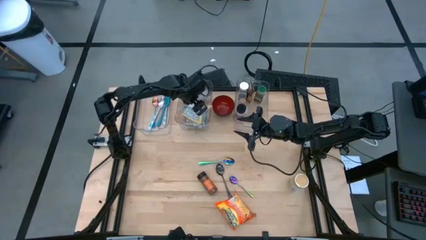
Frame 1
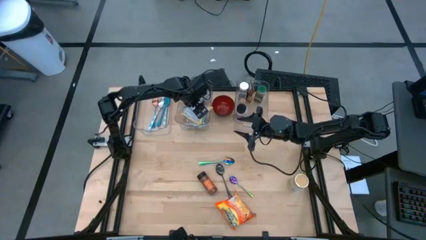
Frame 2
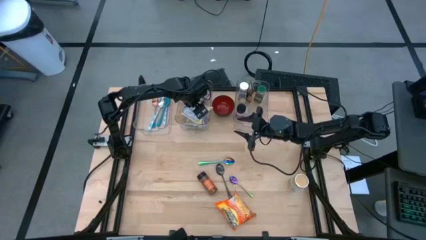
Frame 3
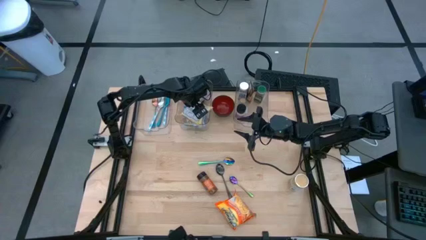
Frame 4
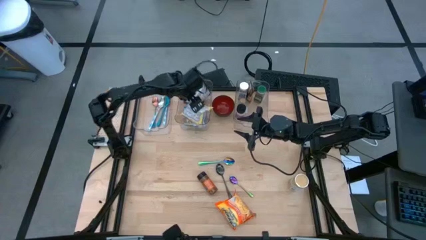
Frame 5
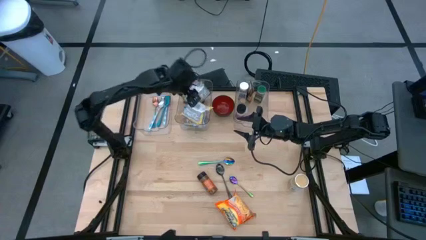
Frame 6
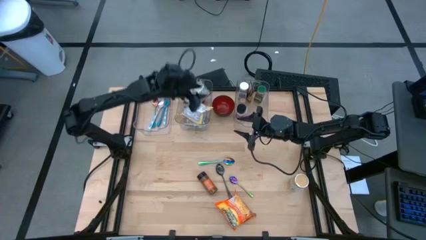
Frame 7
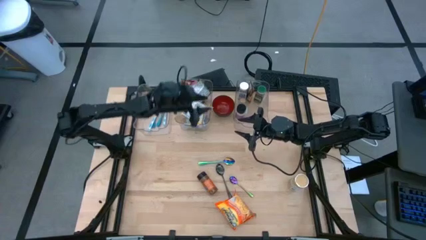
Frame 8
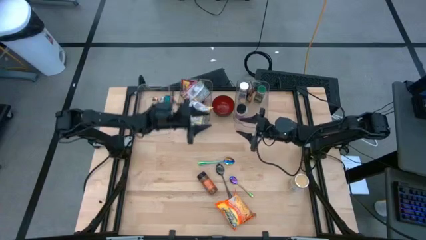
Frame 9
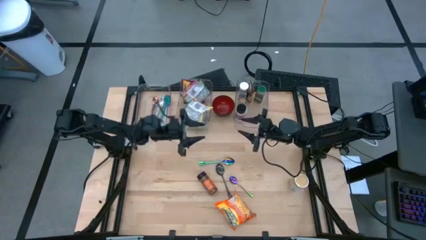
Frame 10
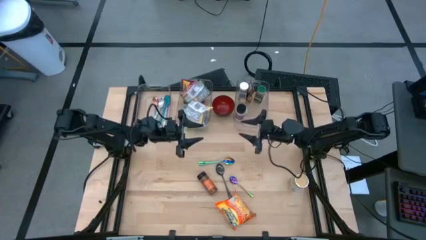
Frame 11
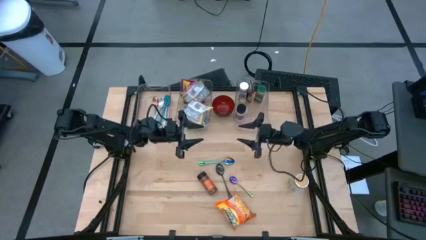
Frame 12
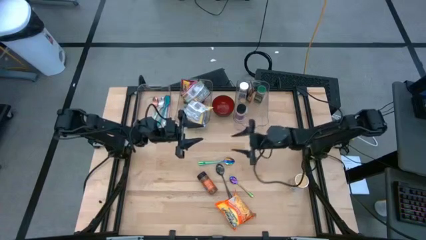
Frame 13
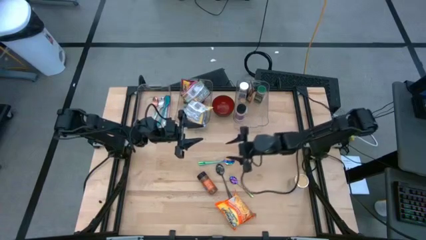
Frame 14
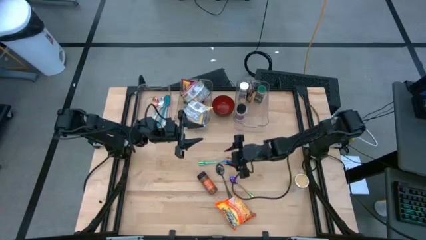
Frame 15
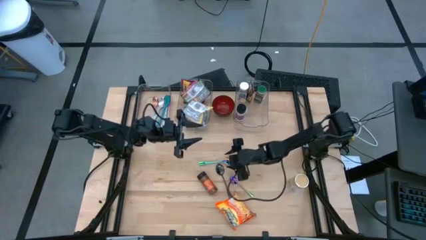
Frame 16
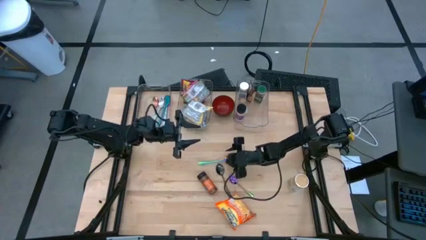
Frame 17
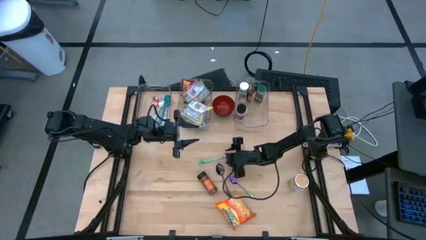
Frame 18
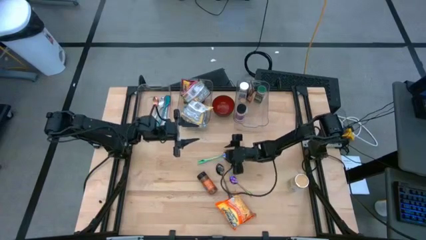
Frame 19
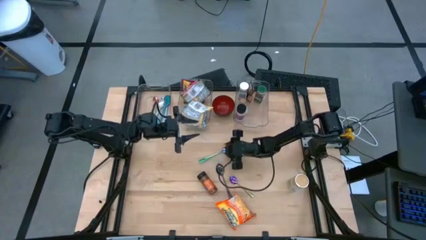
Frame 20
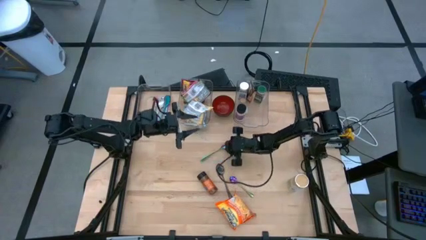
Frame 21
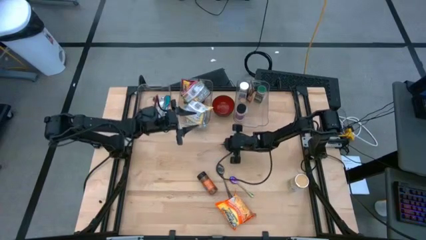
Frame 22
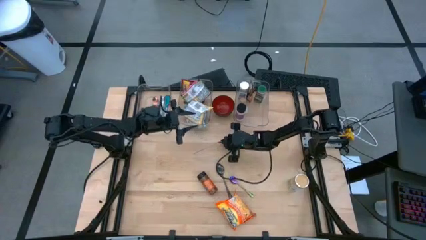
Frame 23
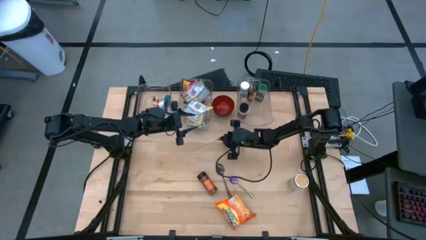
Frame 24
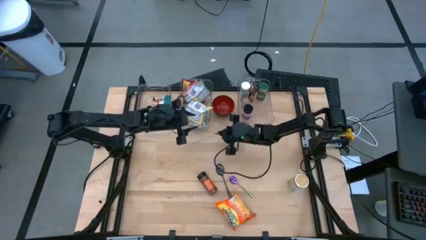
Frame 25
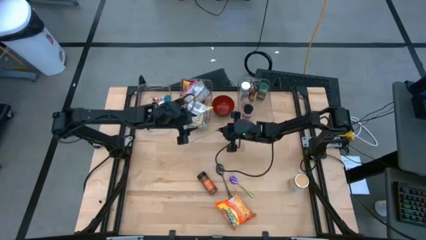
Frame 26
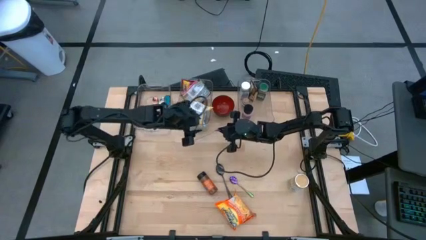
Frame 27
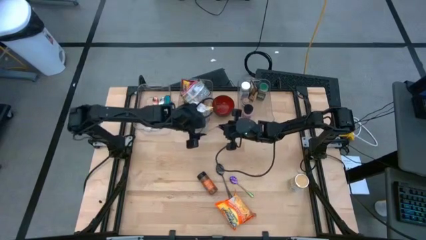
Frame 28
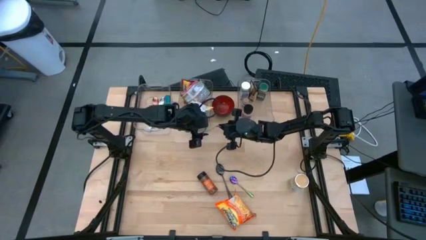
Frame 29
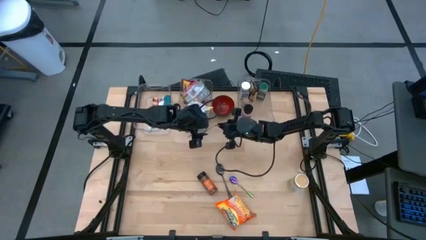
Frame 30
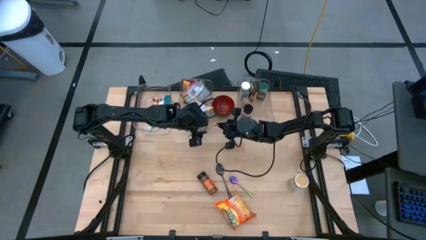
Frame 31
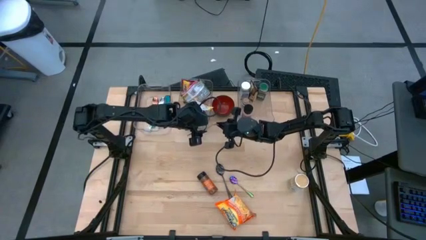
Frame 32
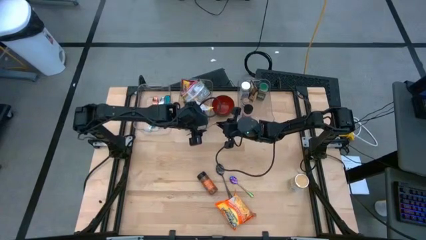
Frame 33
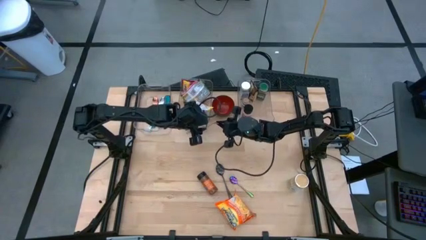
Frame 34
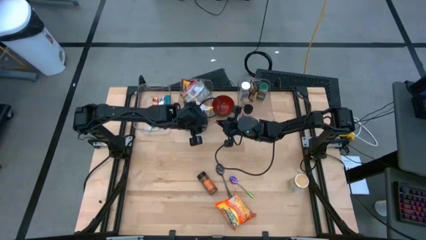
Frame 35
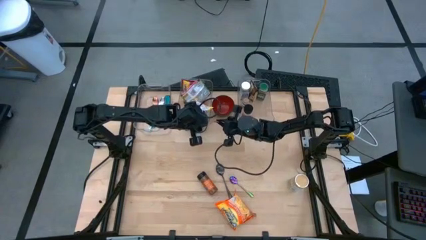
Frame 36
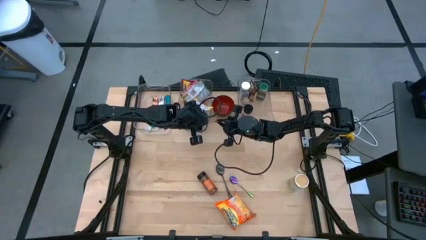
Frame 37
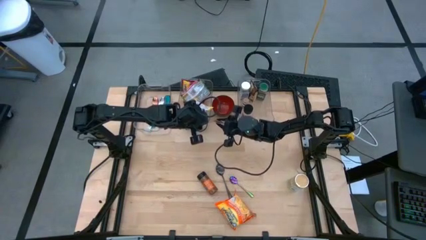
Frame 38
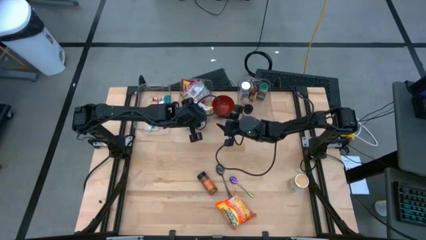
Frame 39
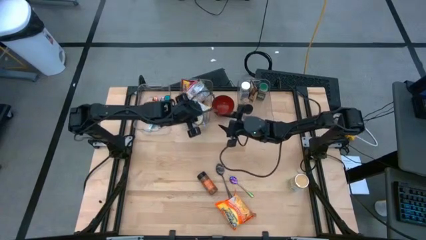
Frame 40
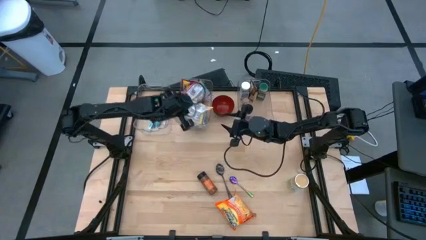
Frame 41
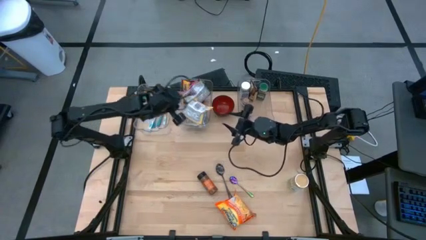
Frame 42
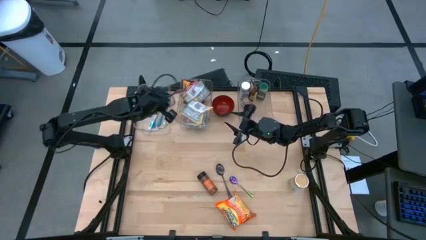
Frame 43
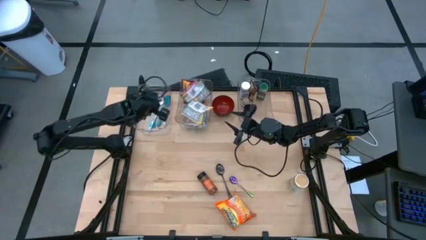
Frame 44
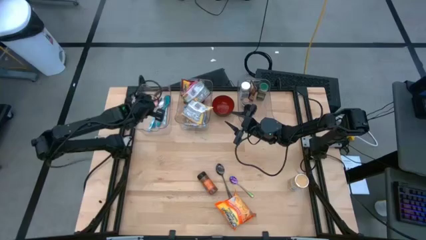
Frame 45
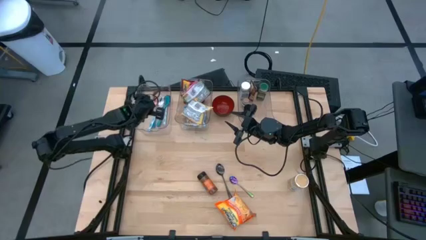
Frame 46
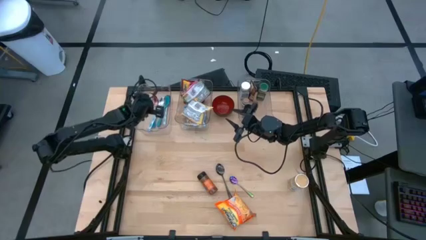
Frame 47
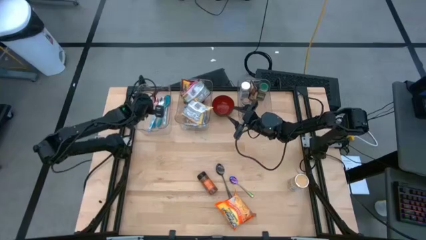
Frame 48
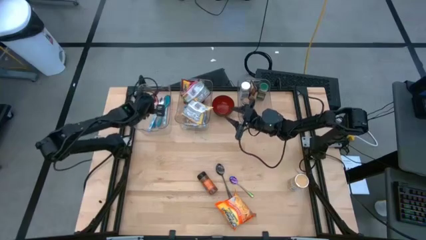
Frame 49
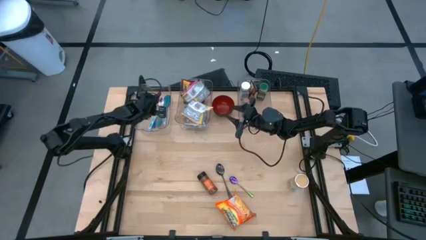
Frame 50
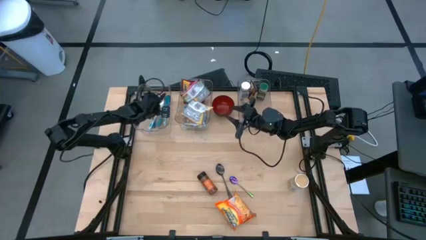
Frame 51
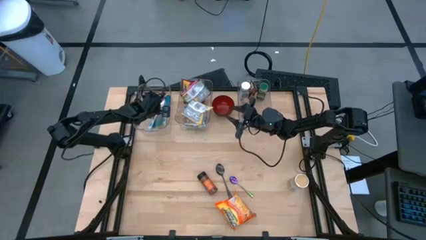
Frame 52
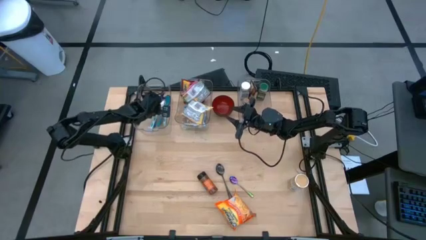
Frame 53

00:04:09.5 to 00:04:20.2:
Task: Pick & Place Food Item
Put the green spoon into the left transparent bin

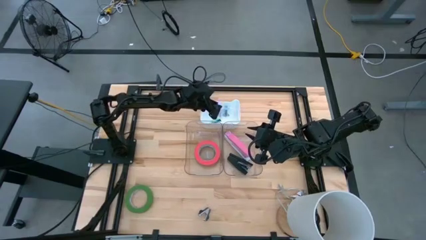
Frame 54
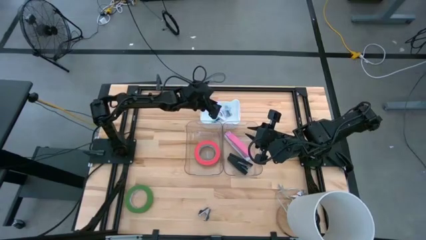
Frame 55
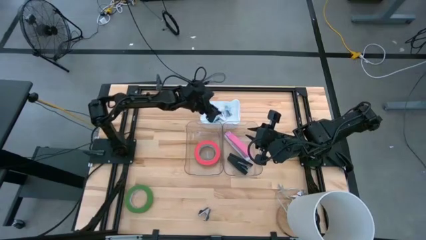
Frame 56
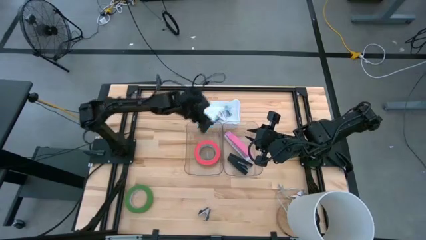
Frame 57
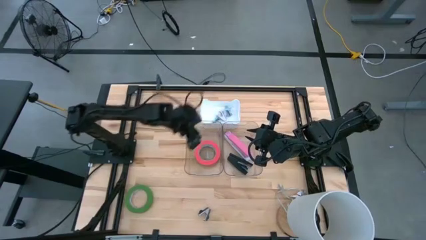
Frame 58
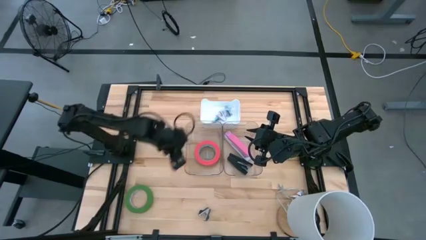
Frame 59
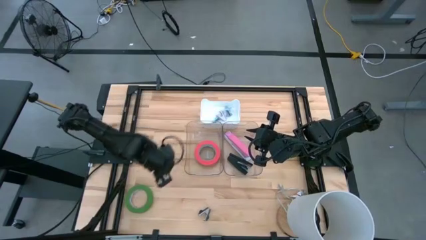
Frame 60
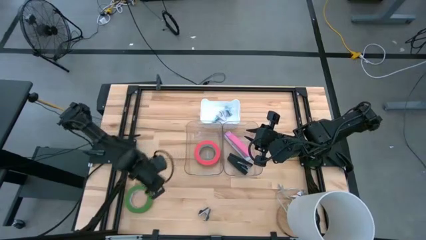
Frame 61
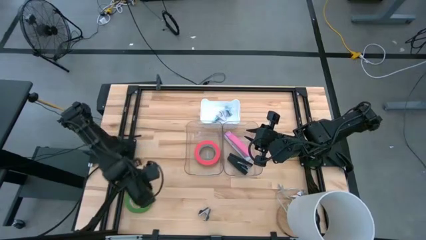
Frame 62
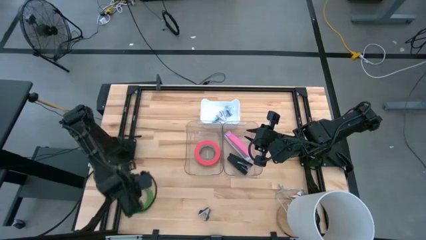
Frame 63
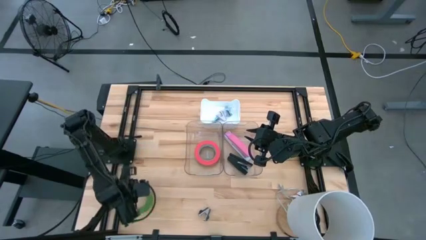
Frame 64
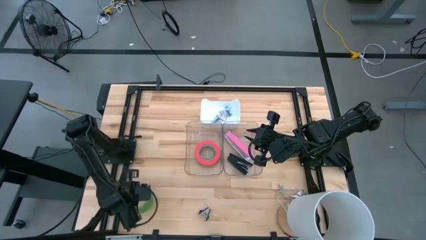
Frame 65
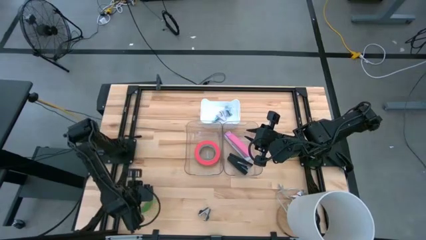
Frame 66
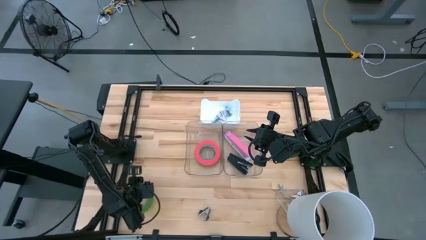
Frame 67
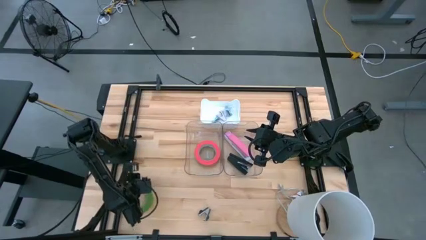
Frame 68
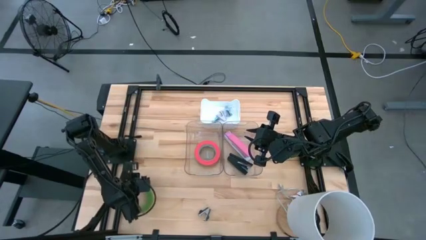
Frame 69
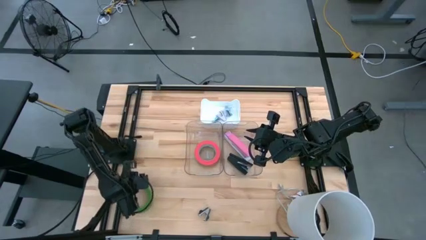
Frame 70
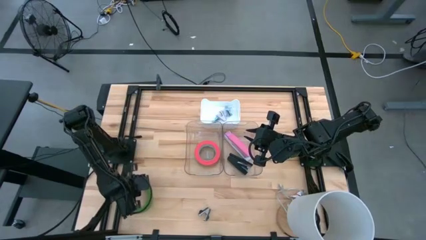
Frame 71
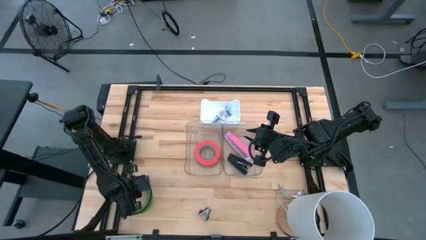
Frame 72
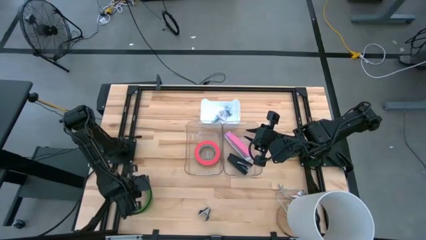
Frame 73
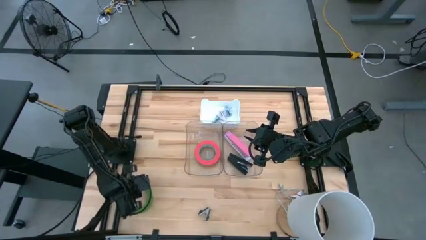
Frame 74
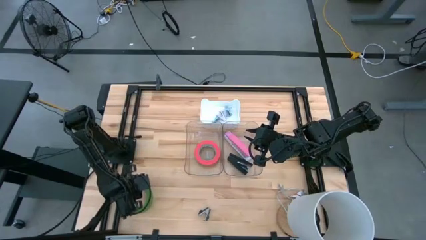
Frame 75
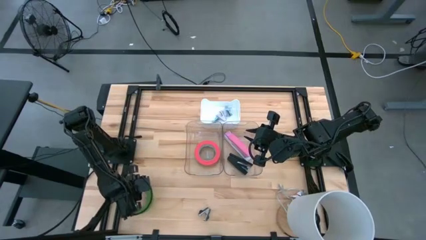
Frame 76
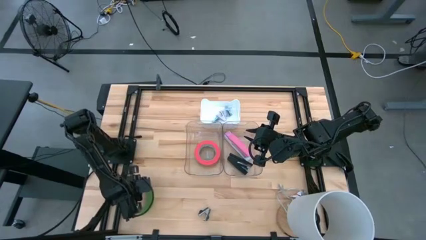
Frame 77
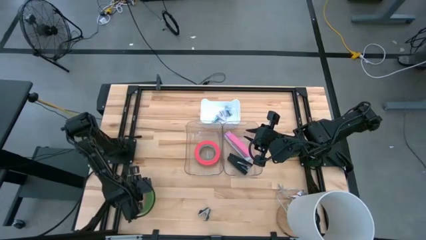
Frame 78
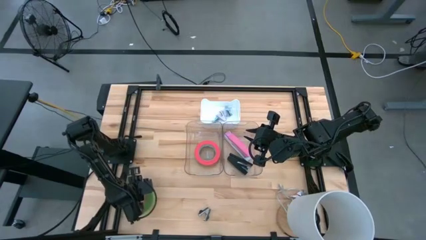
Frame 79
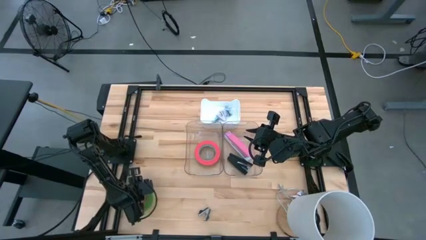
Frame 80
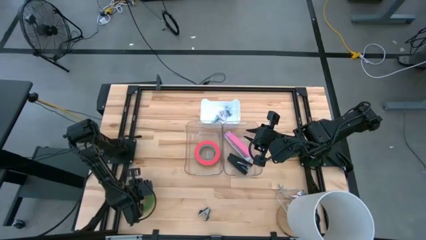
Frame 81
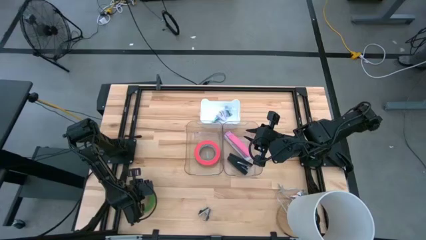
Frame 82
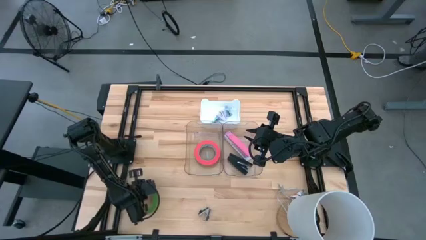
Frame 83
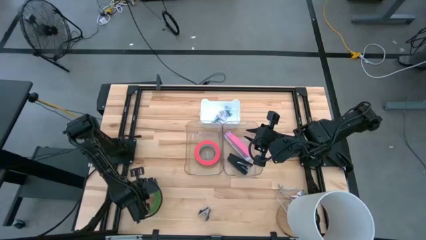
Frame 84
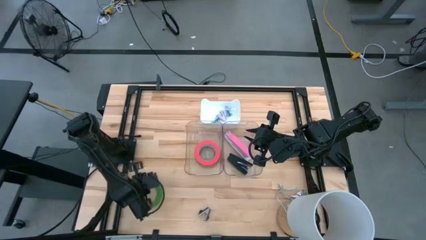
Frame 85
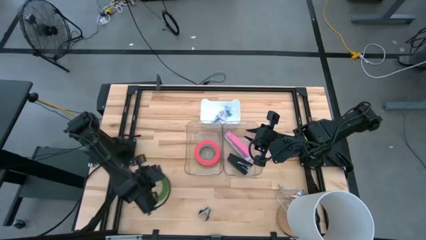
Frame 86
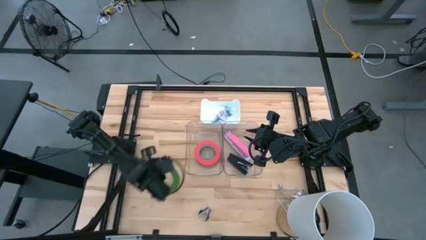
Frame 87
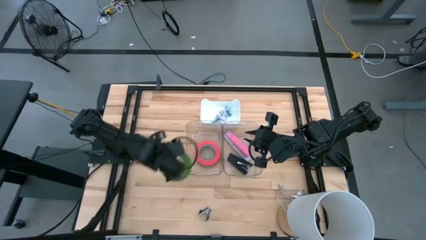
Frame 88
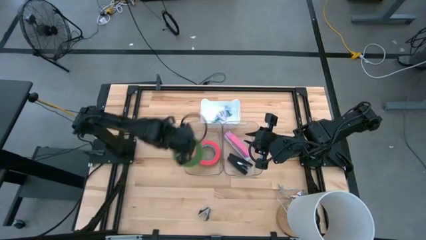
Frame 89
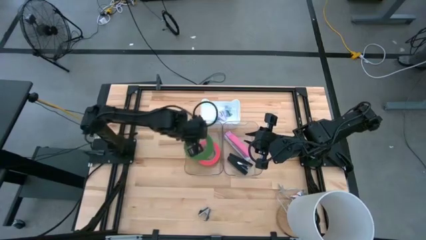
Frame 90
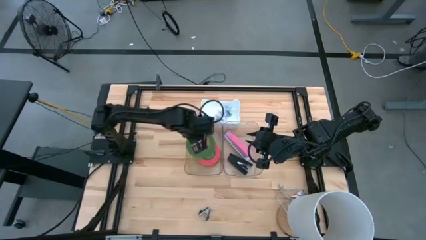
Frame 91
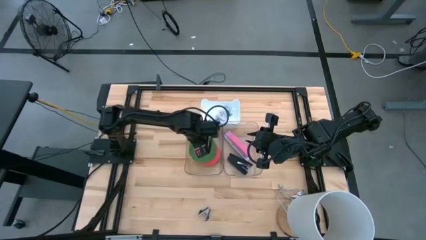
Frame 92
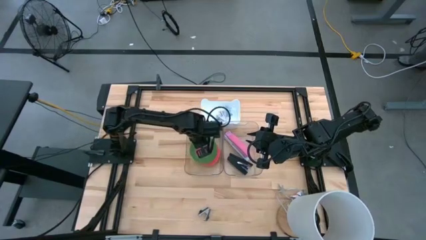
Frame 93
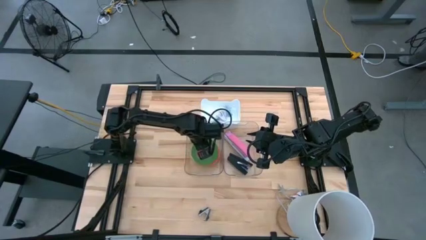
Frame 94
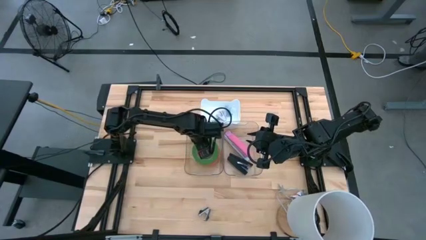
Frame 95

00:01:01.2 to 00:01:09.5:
Task: Pick and place Stapler, Stapler remover, tape
Put the green tape into the left transparent bin
